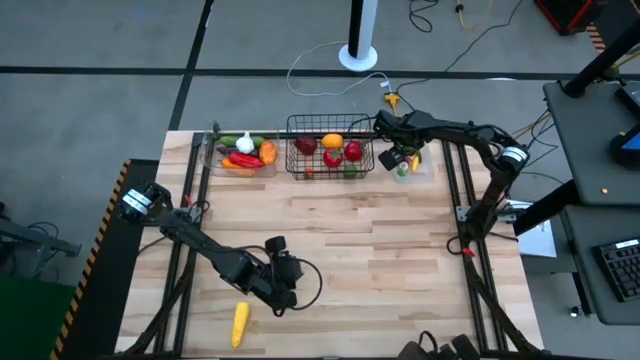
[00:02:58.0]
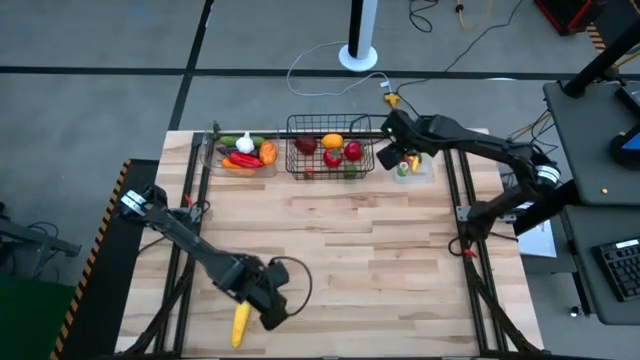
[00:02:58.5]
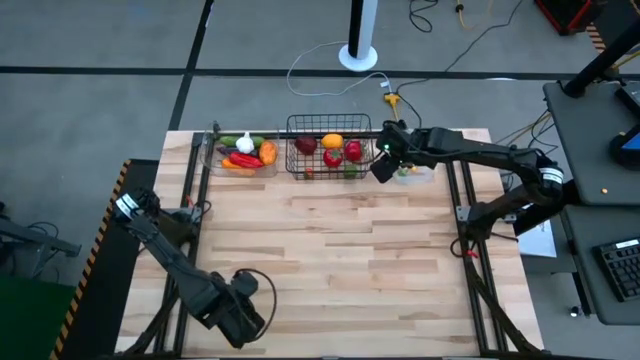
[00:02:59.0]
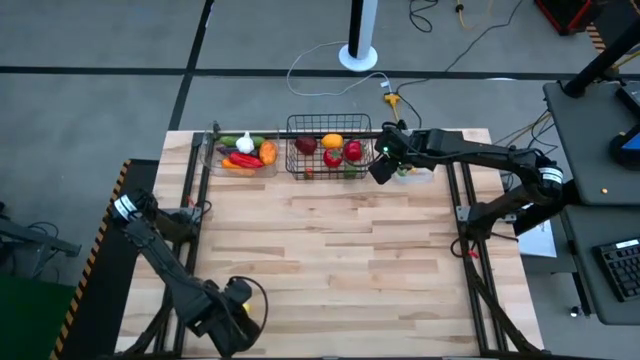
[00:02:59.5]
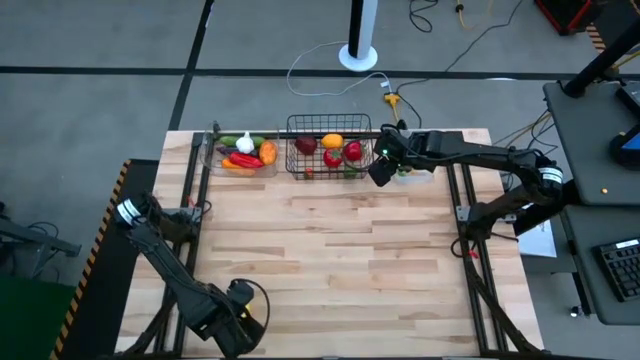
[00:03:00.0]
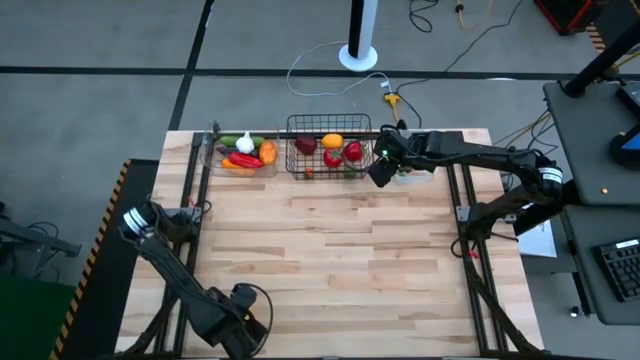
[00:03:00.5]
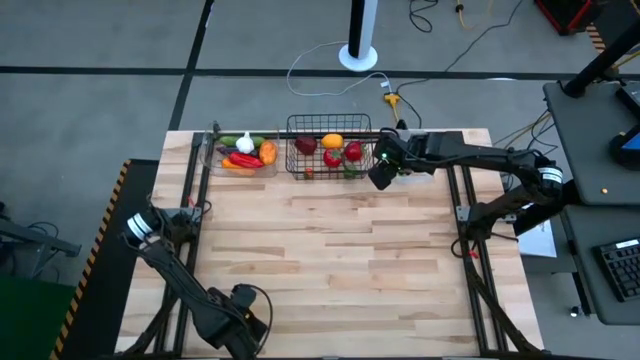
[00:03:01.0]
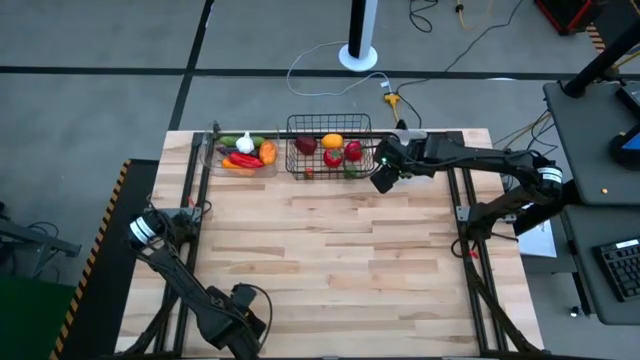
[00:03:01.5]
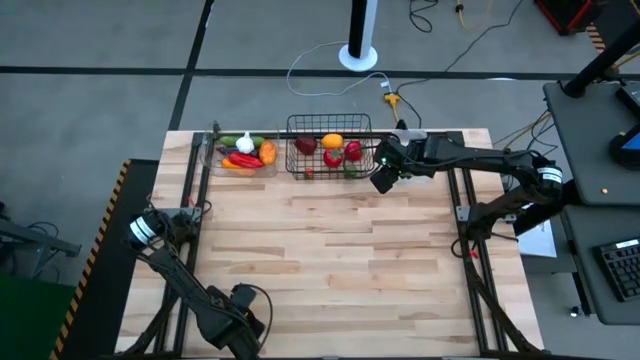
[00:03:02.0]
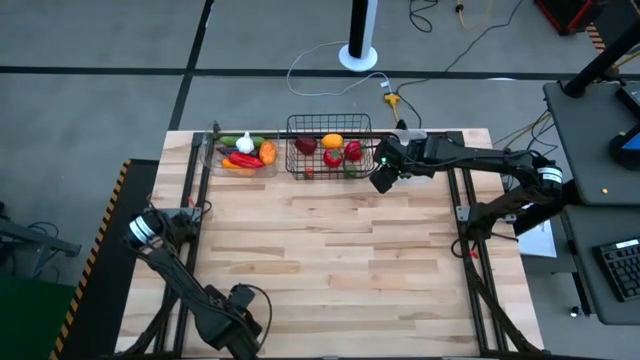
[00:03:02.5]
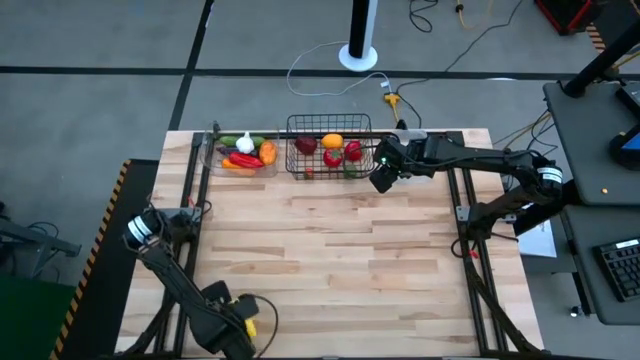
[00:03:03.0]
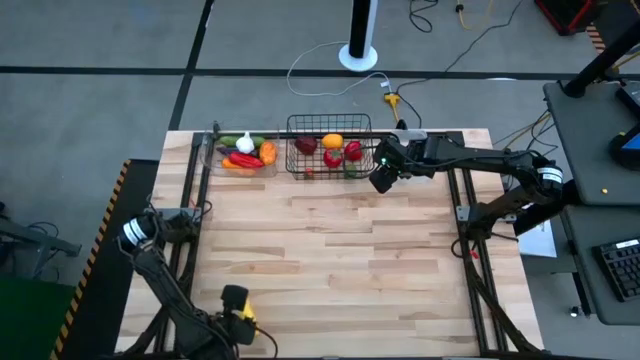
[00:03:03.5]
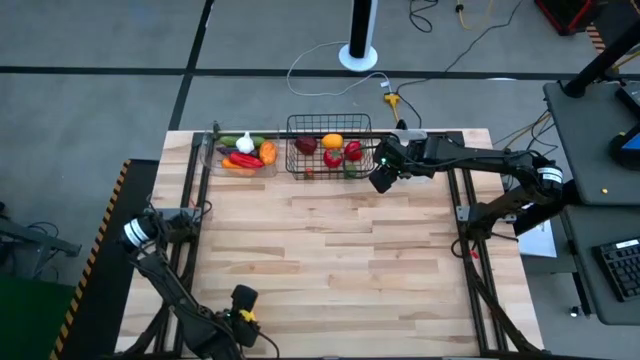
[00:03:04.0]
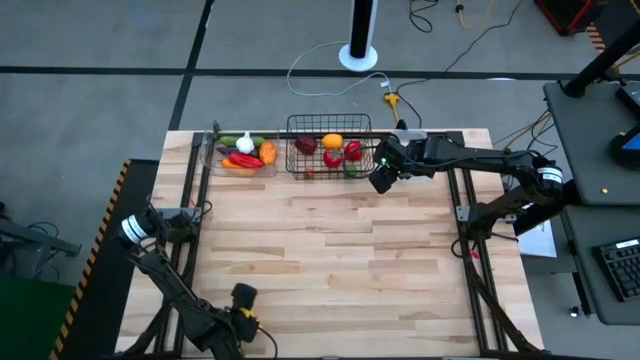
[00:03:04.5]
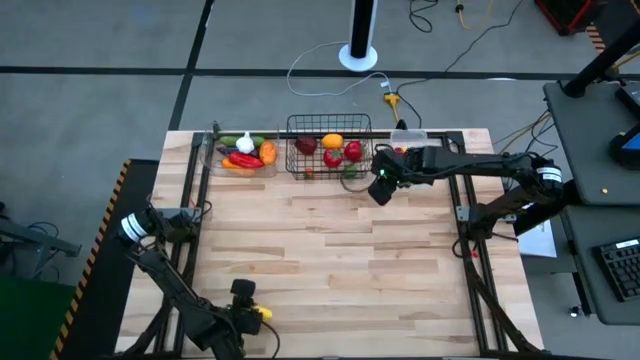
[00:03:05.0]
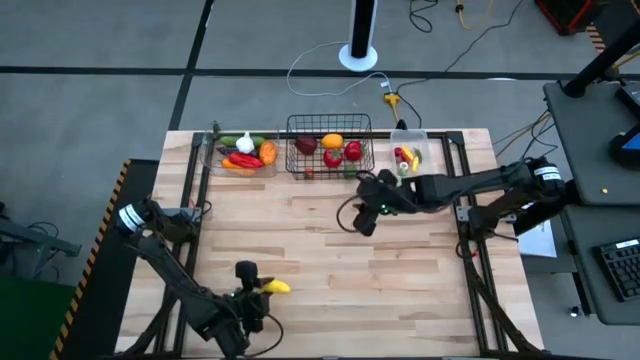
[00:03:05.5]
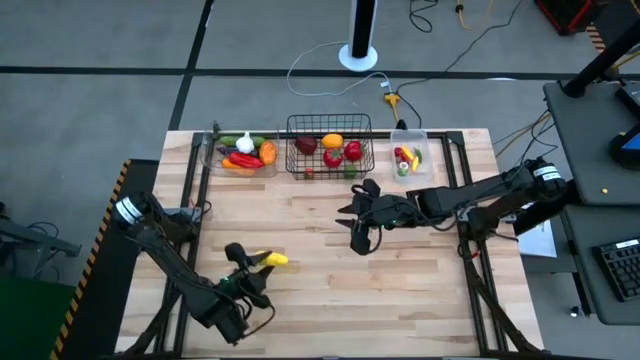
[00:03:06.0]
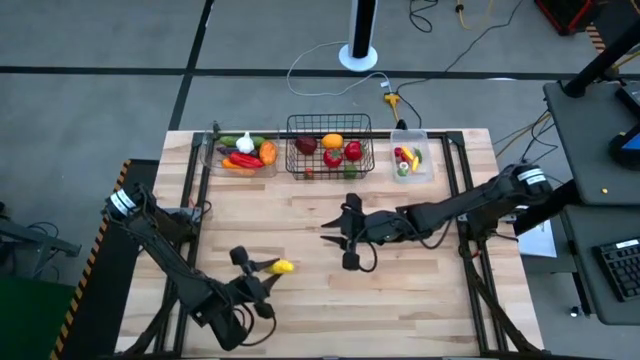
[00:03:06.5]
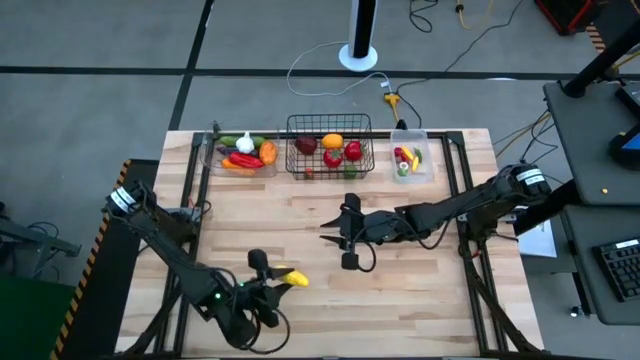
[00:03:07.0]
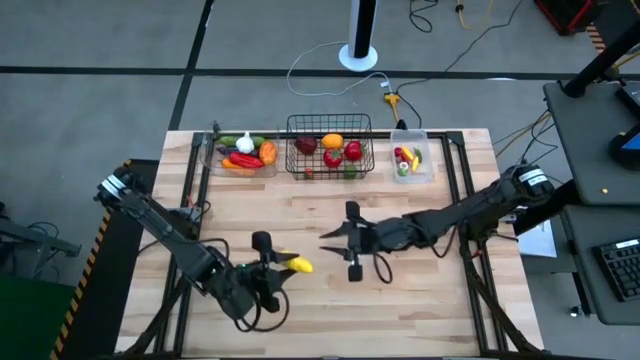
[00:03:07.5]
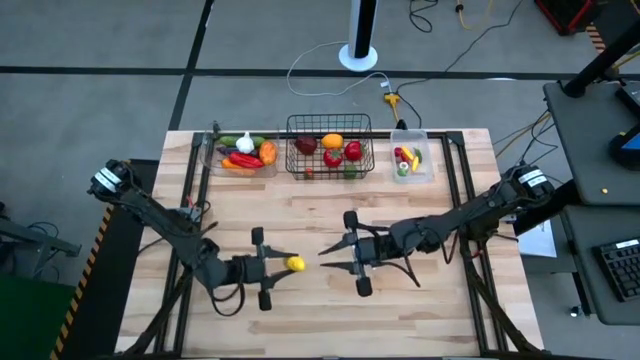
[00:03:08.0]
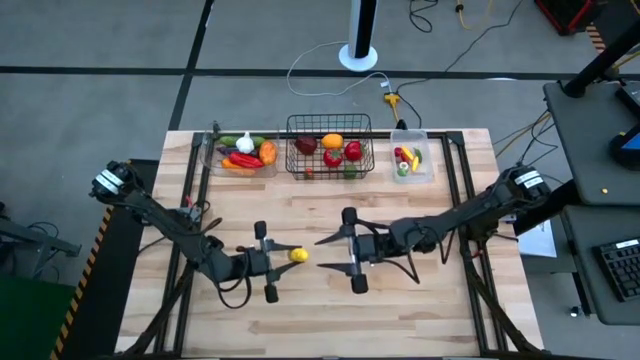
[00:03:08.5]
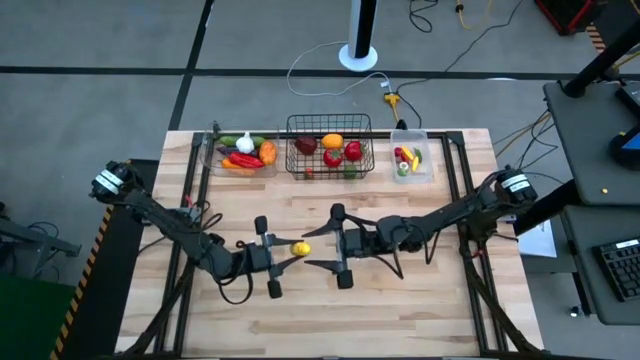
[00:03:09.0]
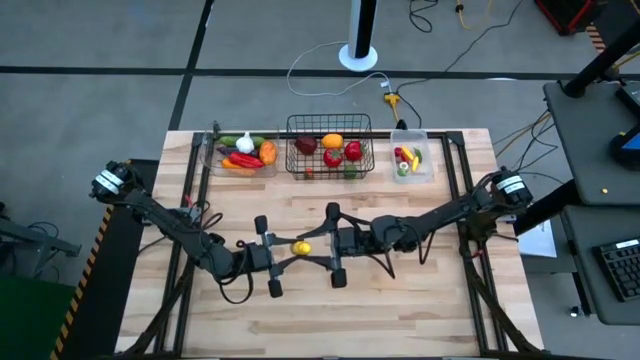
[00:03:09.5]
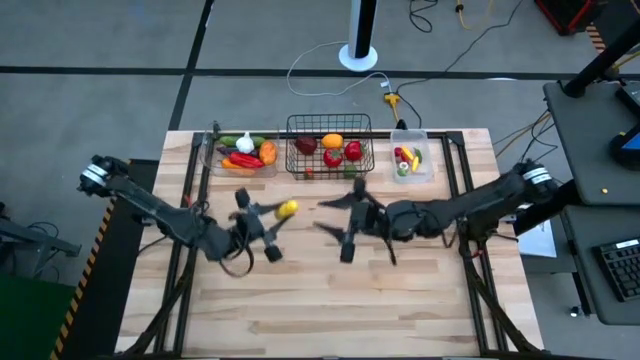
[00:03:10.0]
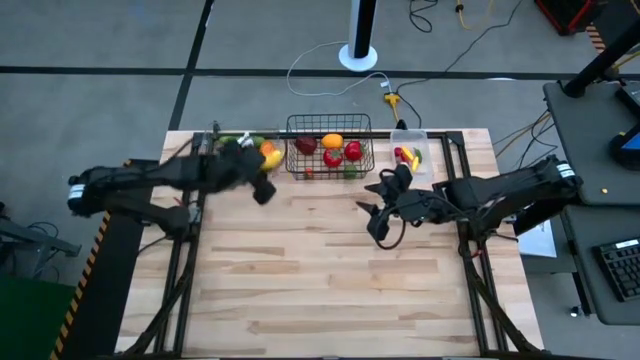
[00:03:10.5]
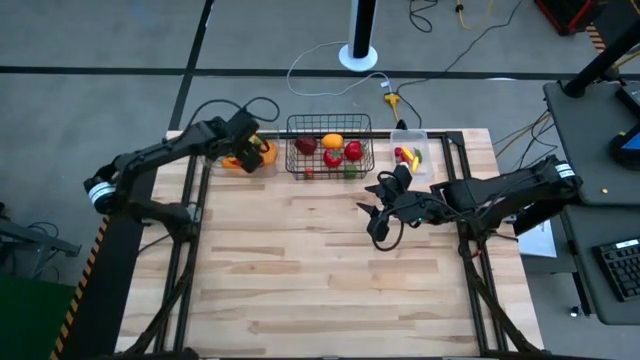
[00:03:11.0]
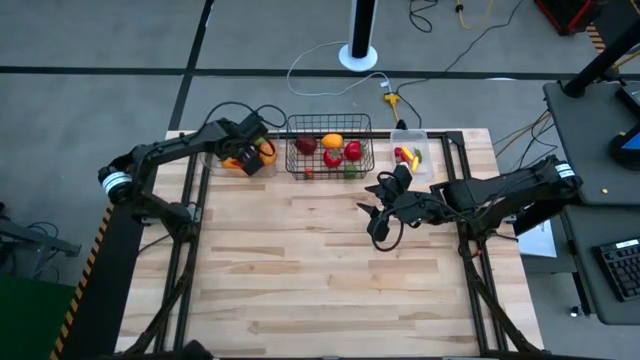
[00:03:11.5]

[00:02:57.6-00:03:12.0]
Task: Sort produce into baskets
Put the corn into the clear bin

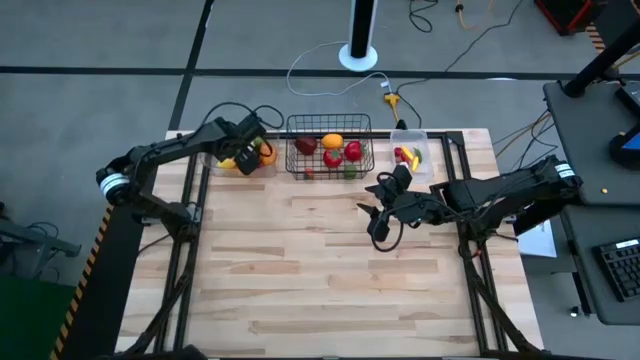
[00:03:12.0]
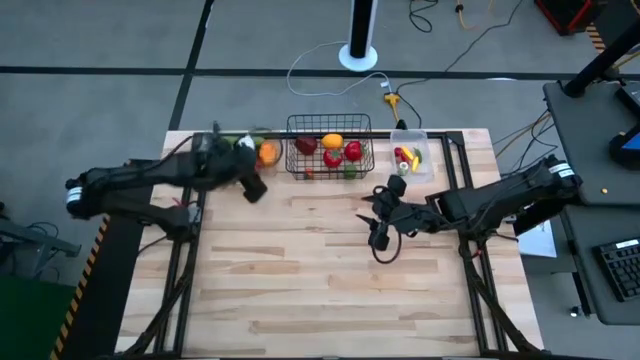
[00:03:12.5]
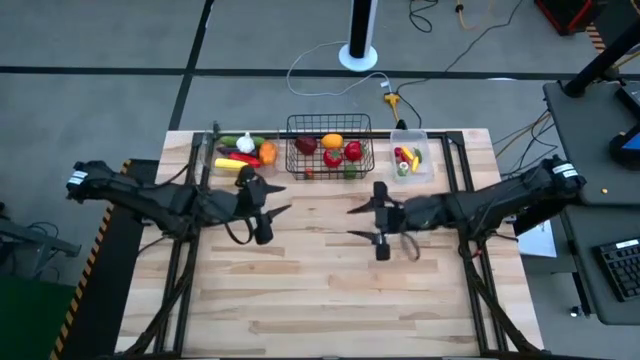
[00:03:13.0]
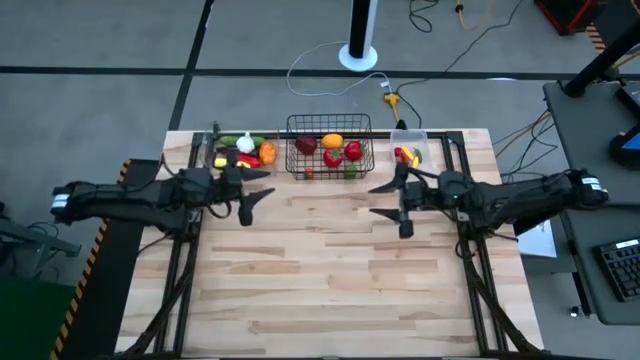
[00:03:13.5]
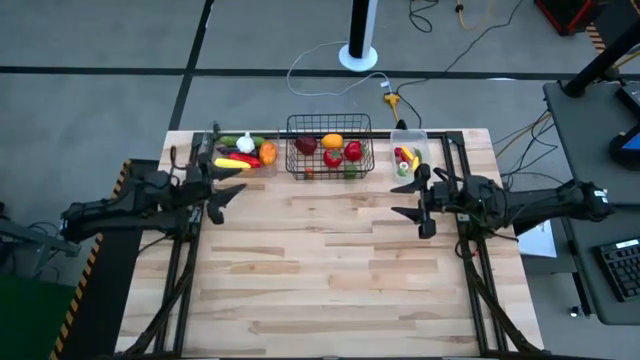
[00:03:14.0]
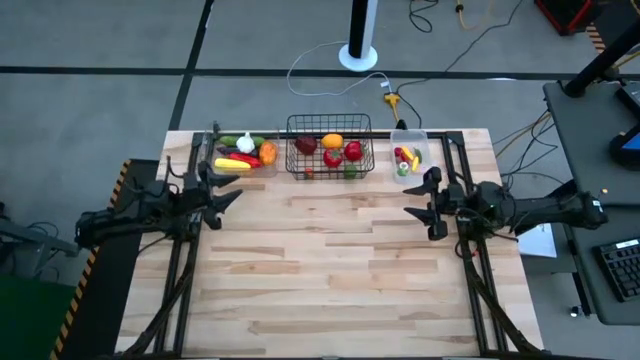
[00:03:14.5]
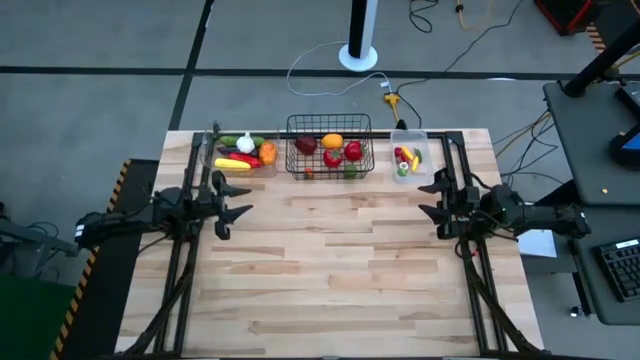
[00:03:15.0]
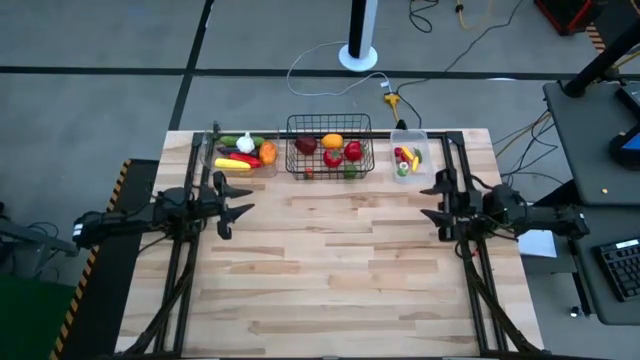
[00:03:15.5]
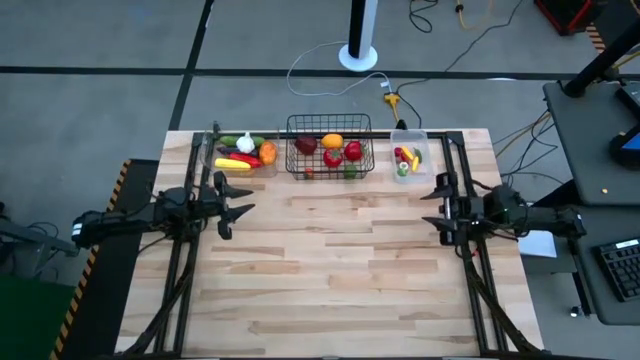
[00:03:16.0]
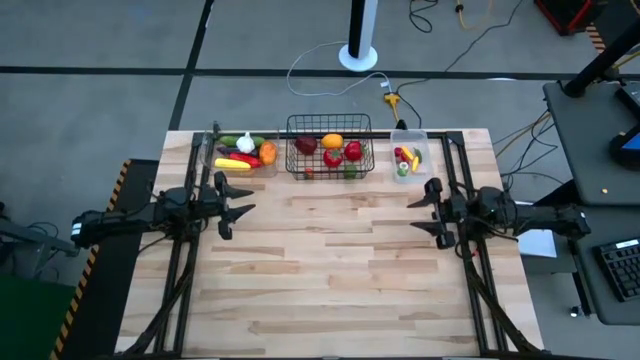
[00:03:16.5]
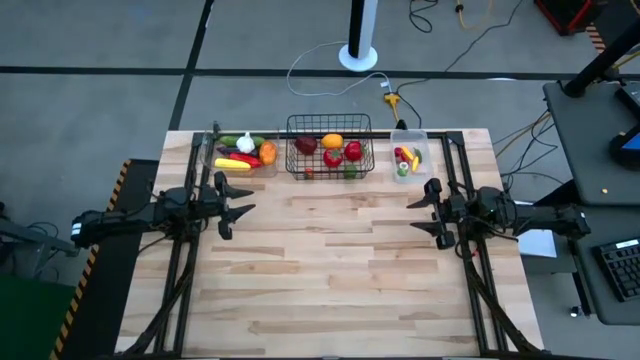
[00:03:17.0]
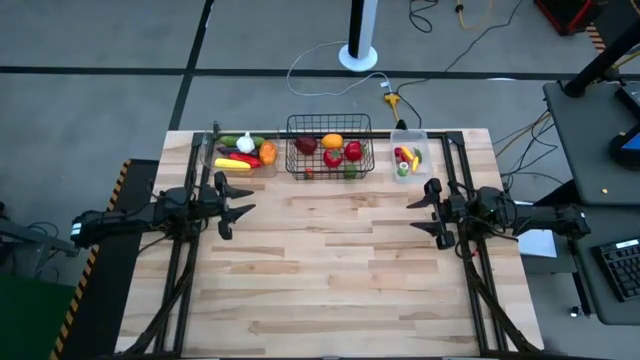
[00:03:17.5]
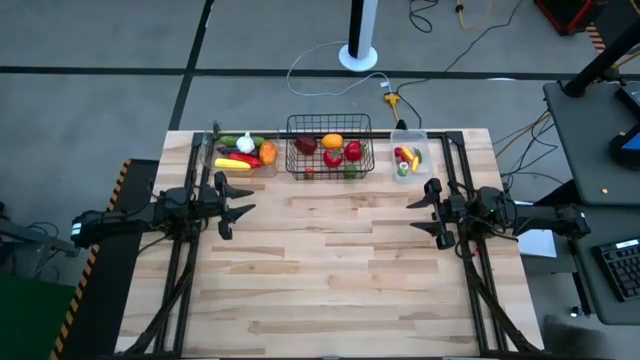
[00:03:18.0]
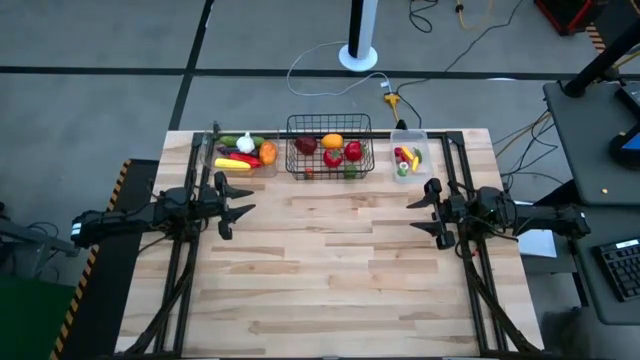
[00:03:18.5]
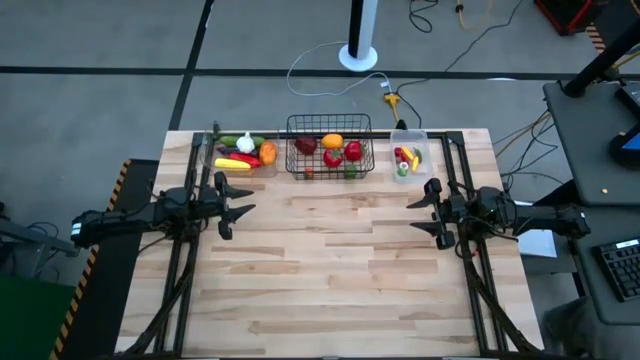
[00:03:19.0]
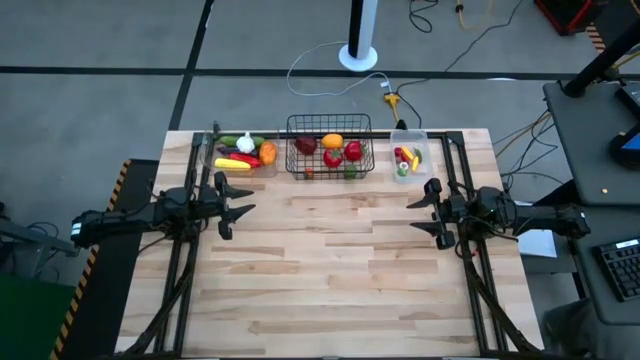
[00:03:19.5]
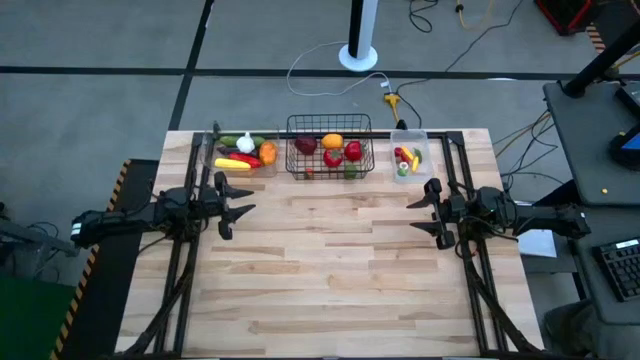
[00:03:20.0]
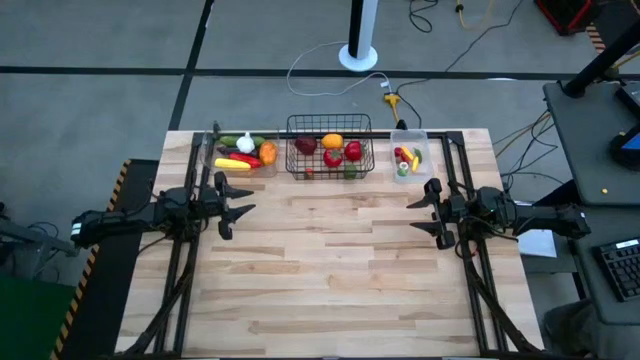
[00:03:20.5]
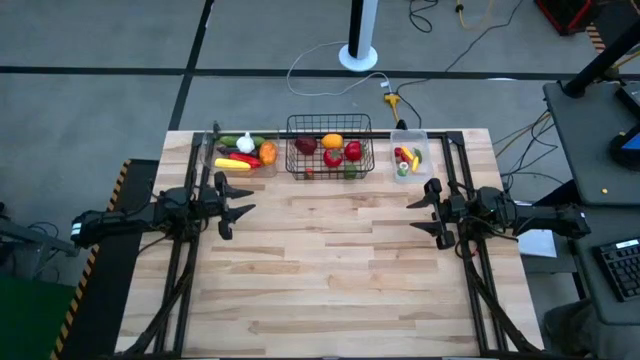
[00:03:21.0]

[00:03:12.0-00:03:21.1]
Return to Home Position
